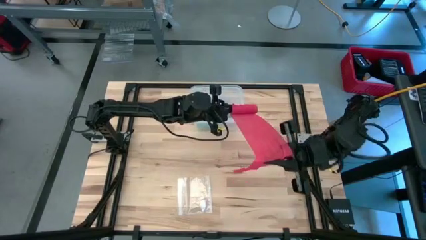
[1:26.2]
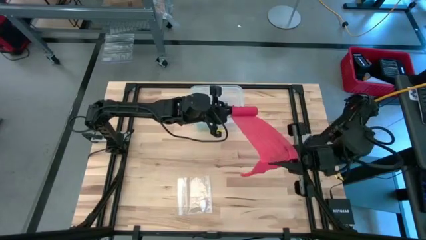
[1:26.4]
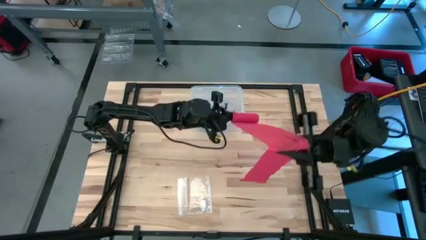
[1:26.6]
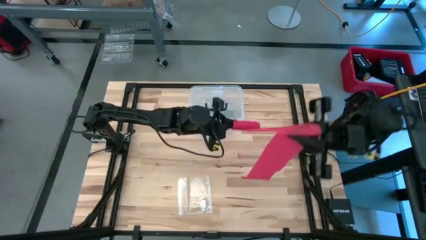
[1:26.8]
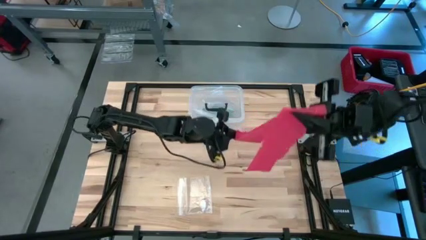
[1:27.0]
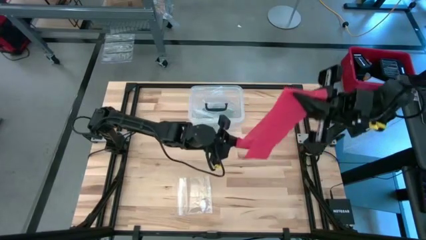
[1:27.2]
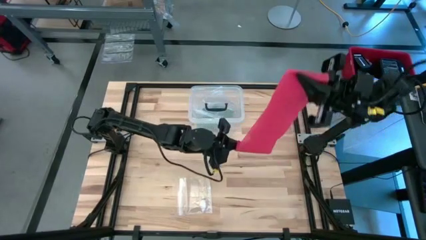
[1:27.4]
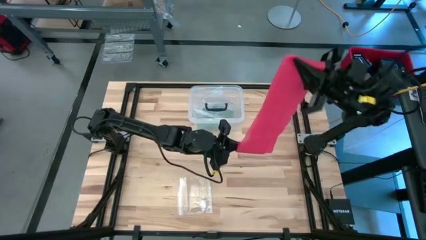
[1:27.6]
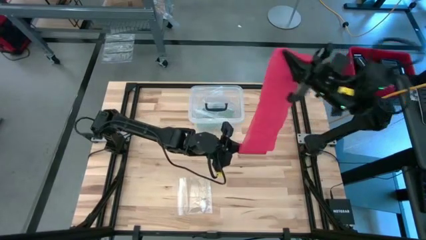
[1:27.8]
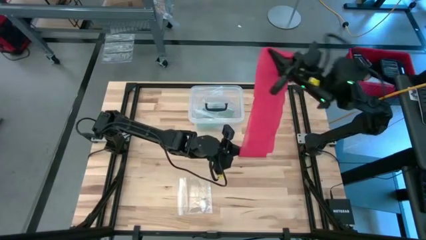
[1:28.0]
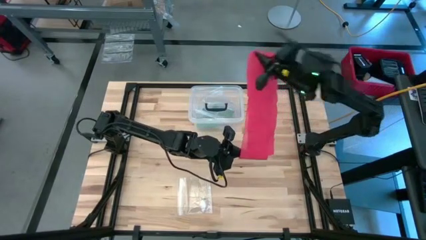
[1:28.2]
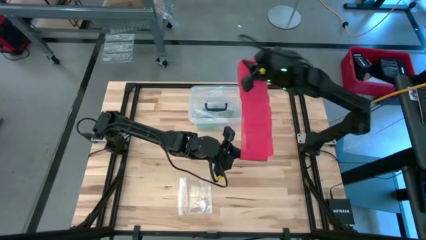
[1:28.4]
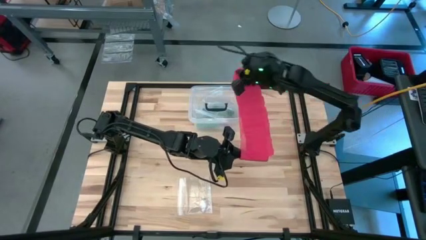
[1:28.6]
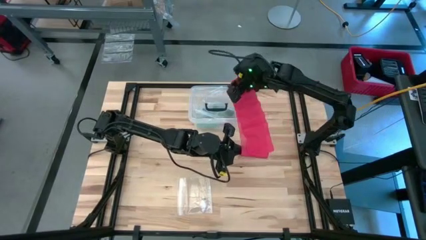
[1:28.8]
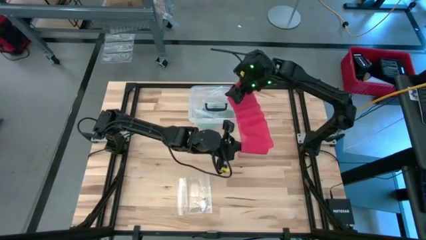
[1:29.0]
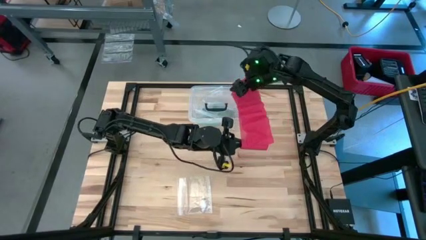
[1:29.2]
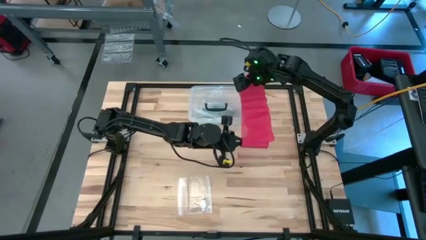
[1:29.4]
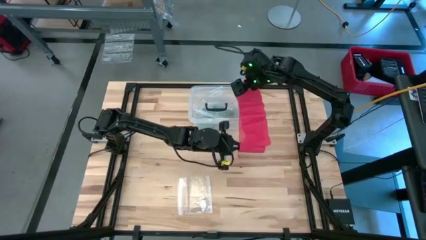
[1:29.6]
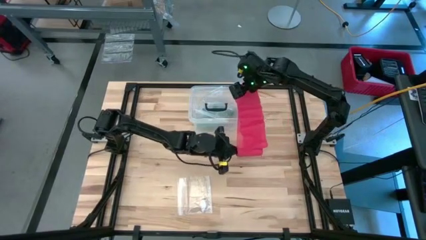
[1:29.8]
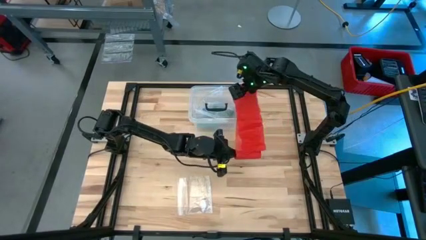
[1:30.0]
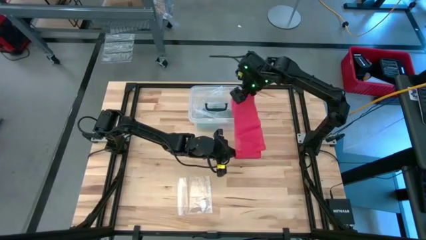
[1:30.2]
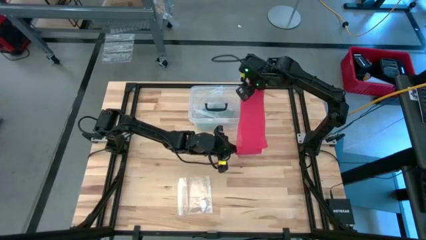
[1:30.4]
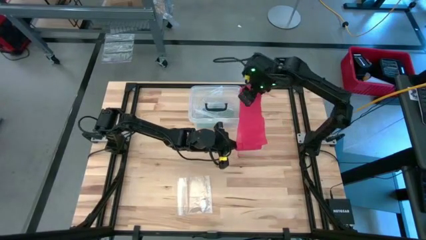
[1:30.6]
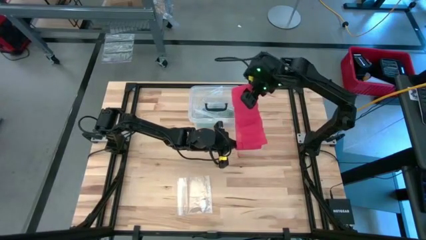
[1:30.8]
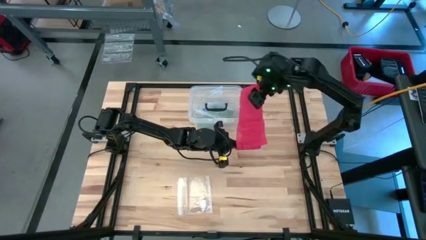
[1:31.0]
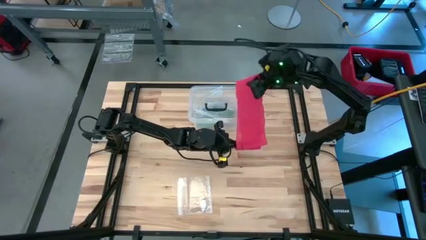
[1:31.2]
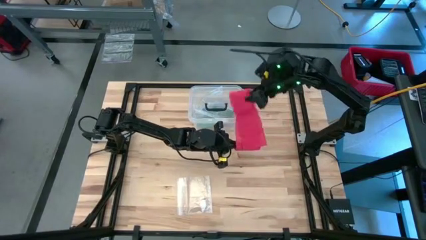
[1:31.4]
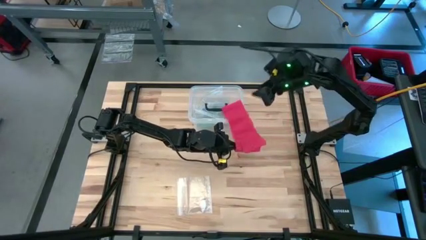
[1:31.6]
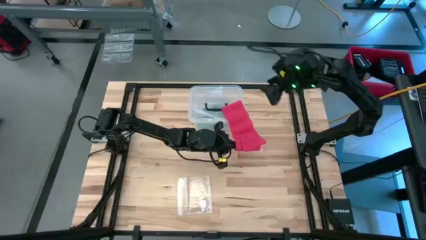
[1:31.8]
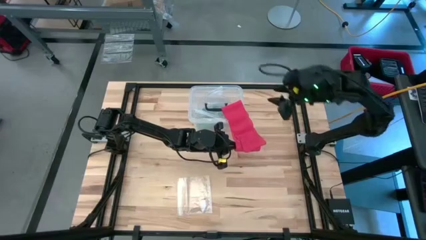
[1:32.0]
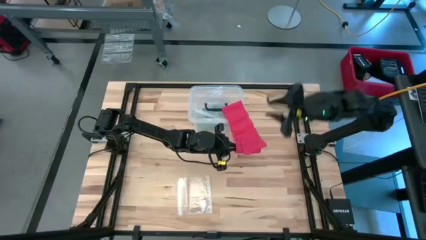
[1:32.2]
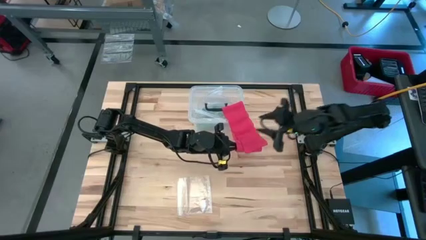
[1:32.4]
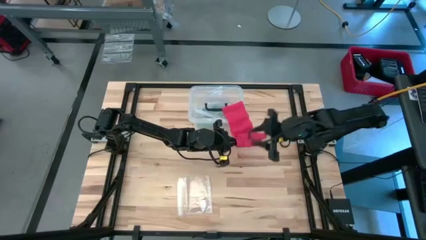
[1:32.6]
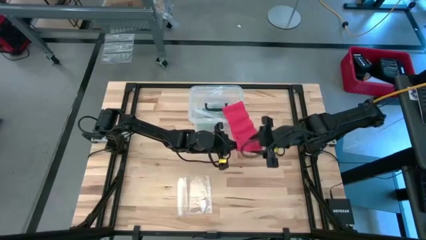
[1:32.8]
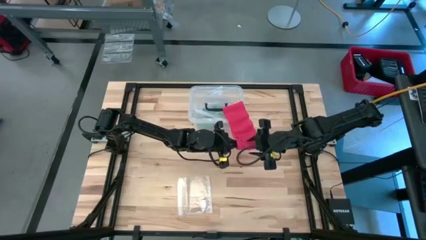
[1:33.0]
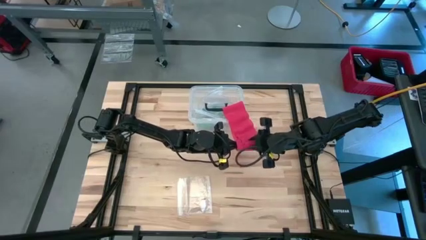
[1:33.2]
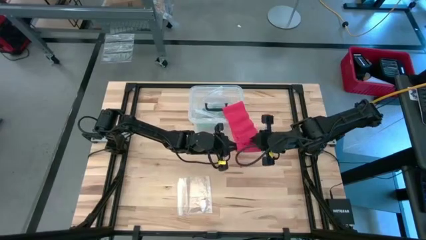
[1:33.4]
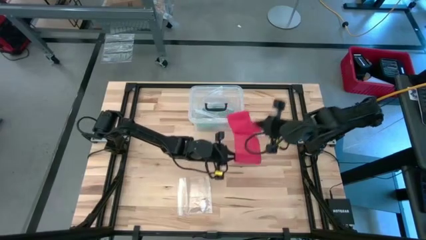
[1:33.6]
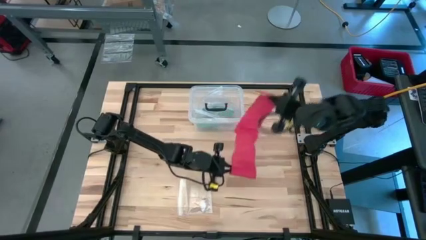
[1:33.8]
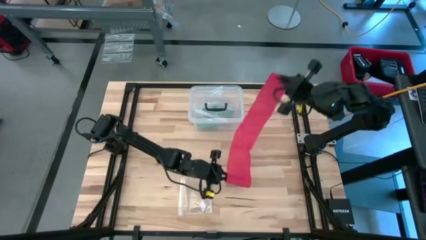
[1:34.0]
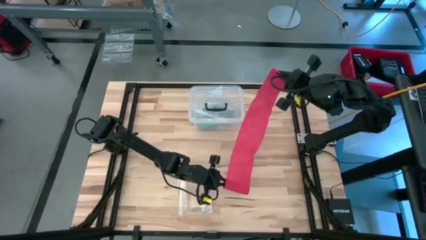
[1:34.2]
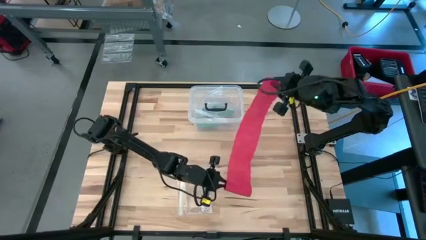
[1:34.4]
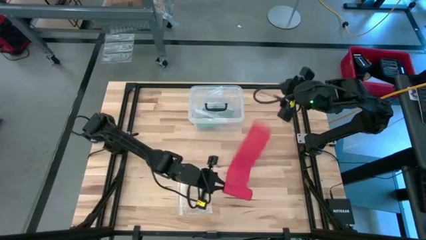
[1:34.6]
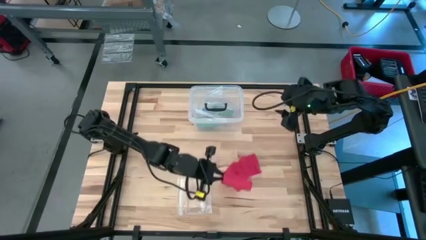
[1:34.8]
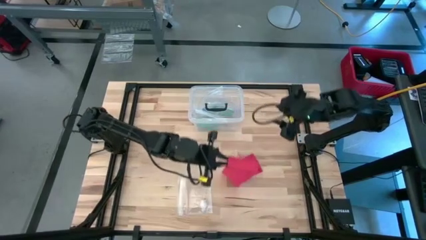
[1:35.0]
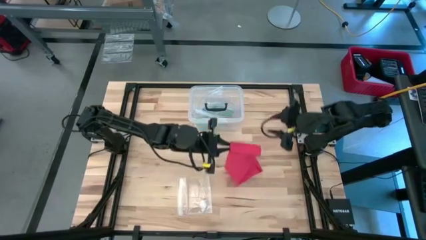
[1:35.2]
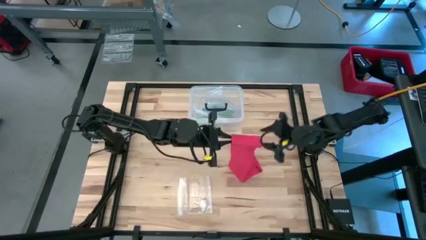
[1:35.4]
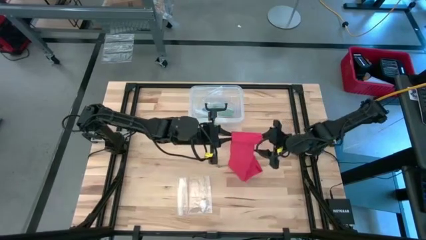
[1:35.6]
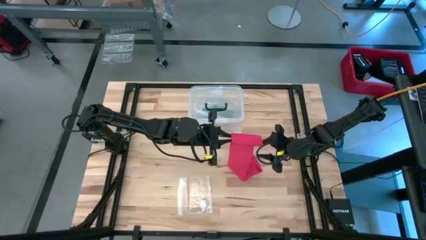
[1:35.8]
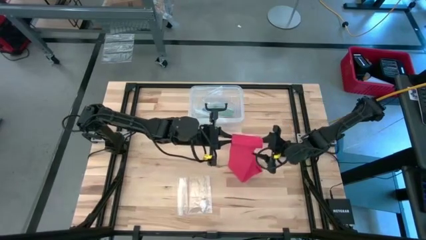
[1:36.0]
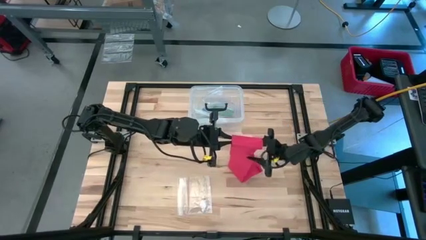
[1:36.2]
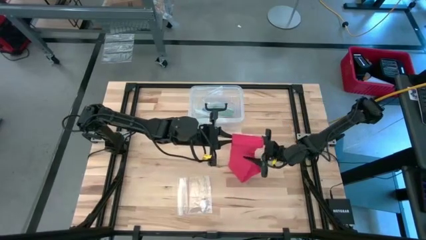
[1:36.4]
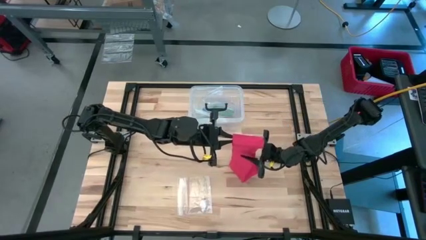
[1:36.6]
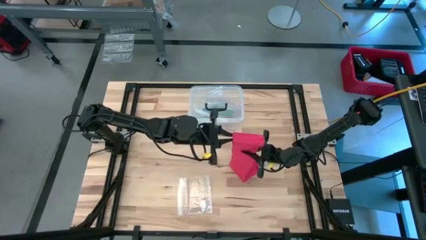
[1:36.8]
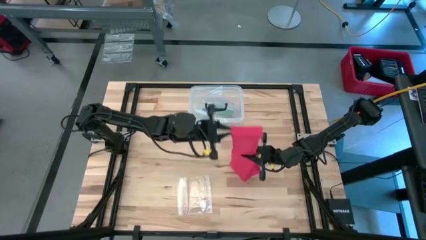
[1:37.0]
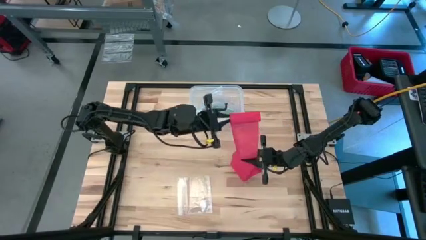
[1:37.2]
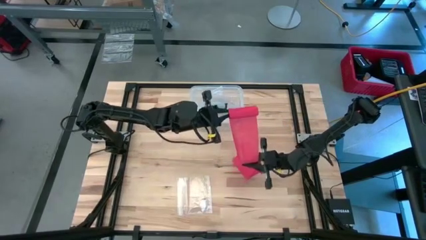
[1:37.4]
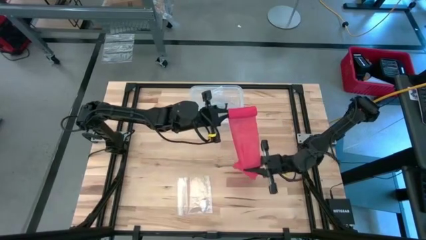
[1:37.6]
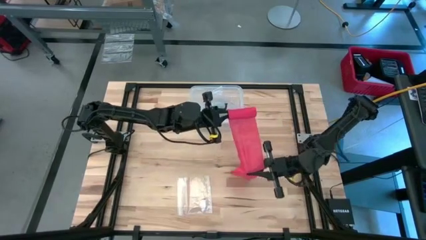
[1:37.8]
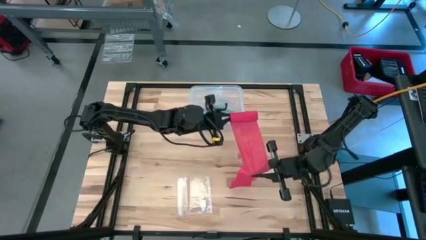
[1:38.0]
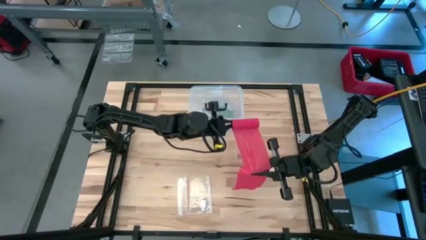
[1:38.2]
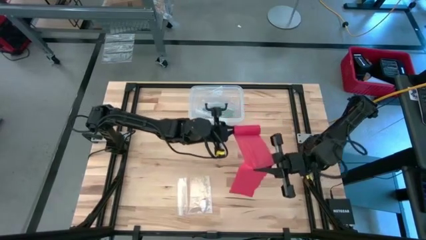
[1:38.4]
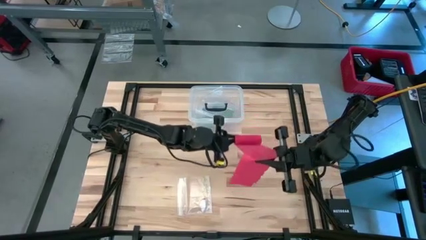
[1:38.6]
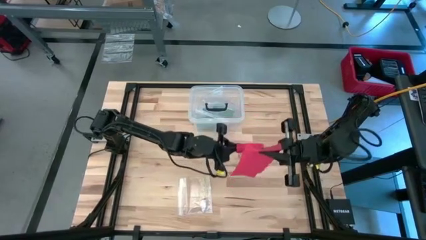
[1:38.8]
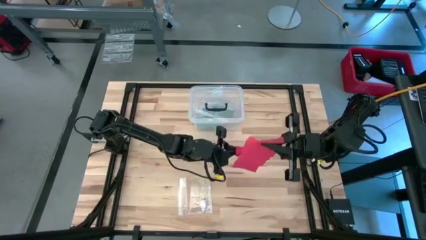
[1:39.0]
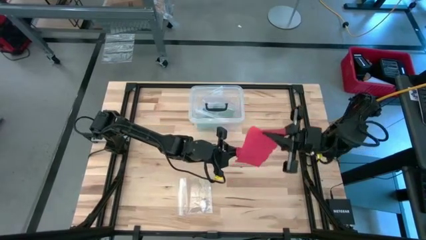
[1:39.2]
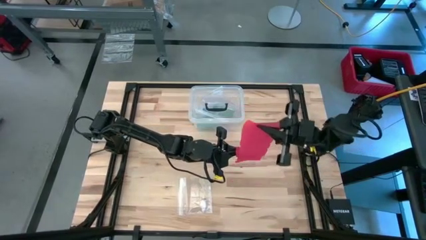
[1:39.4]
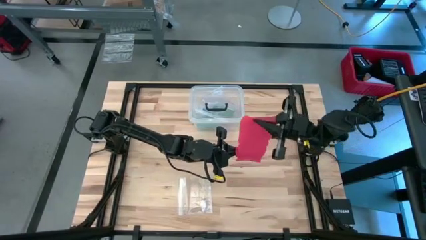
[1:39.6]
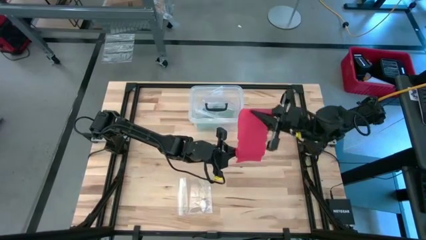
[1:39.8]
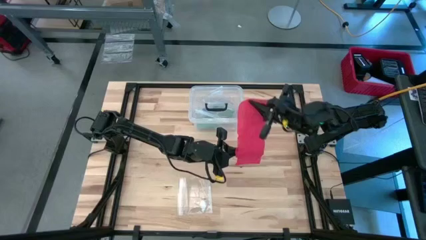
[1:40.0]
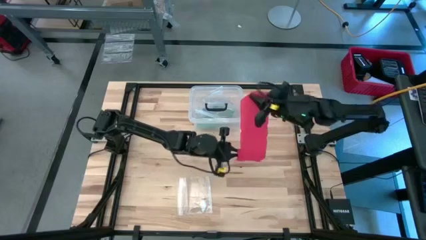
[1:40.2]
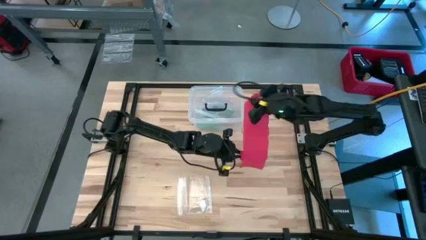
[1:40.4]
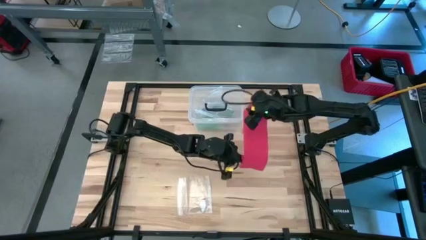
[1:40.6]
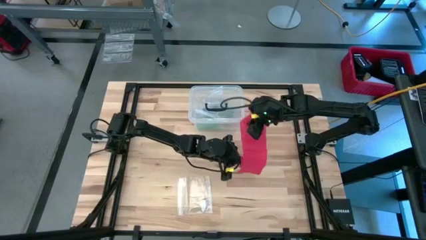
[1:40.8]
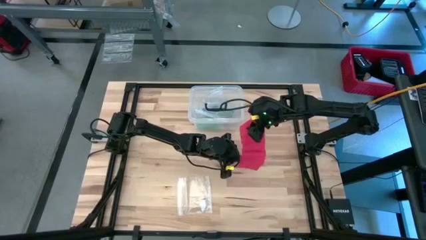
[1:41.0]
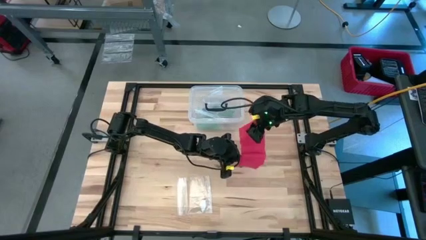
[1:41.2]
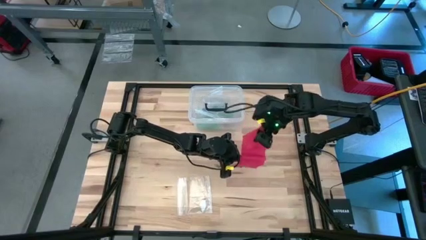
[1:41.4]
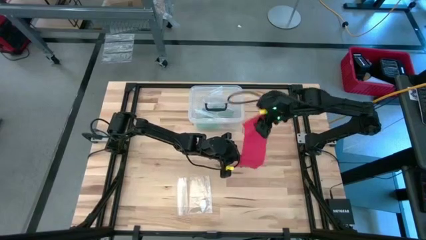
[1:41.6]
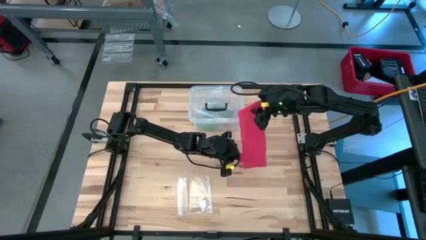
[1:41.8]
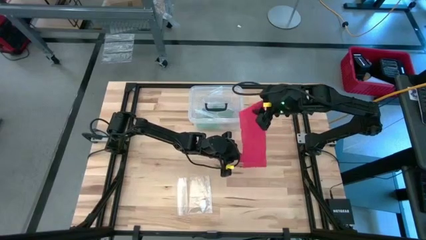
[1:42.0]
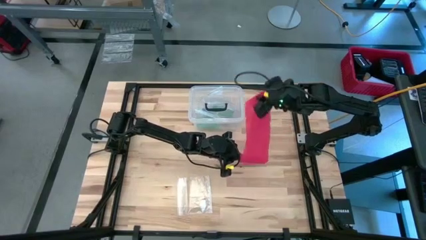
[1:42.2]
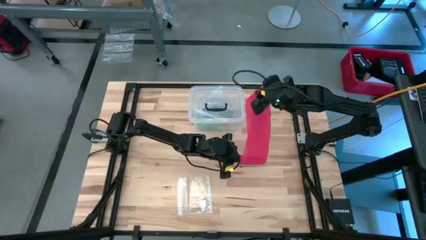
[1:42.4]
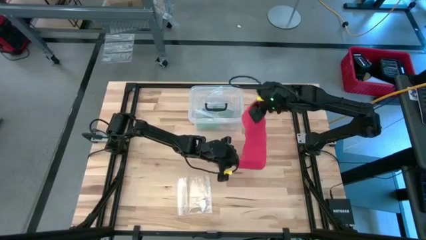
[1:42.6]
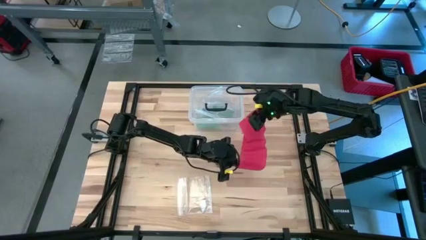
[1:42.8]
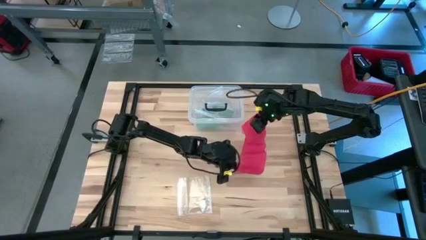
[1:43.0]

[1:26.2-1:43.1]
Task: Roll bandage
Roll the red bandage

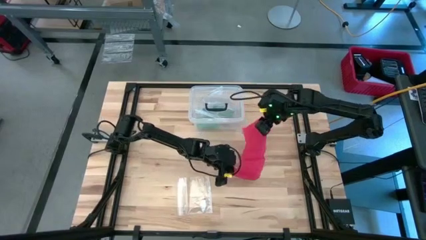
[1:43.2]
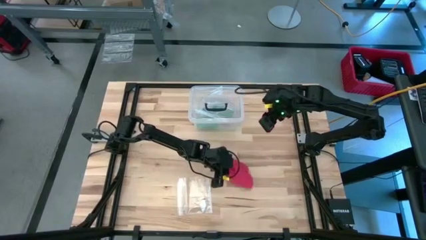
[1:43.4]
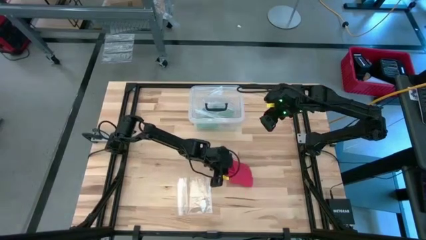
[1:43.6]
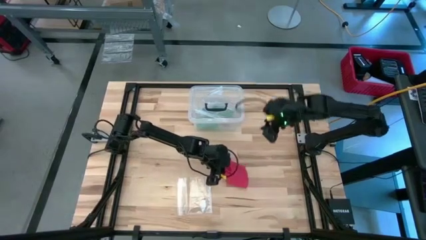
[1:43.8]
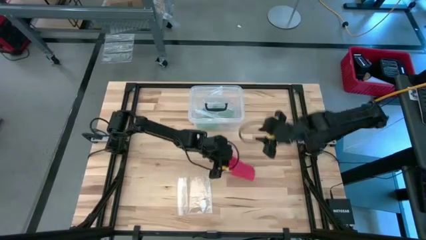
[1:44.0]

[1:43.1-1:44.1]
Roll the red bandage
